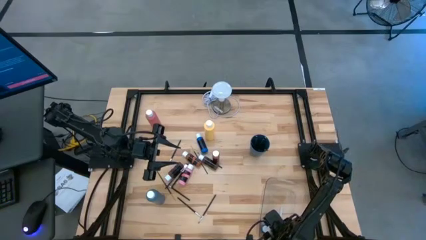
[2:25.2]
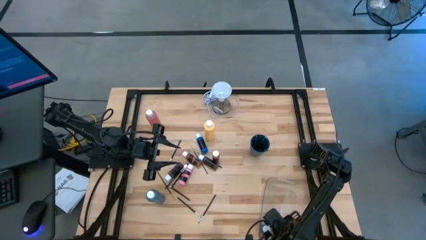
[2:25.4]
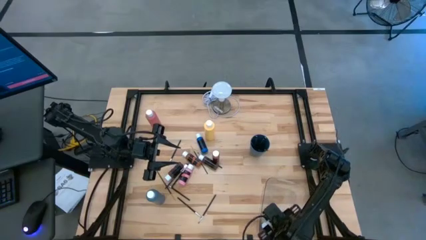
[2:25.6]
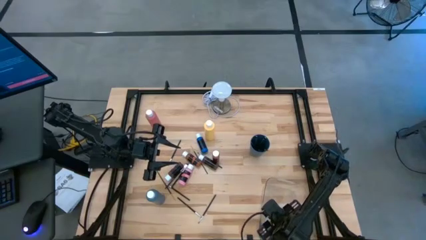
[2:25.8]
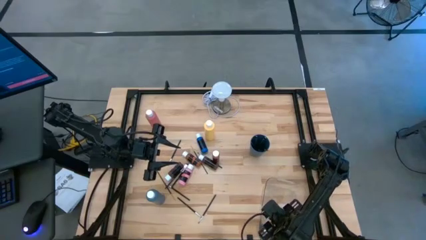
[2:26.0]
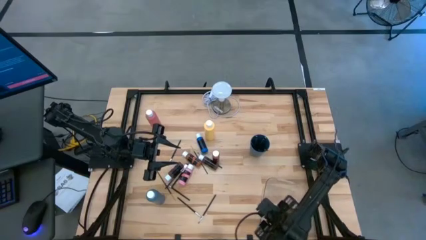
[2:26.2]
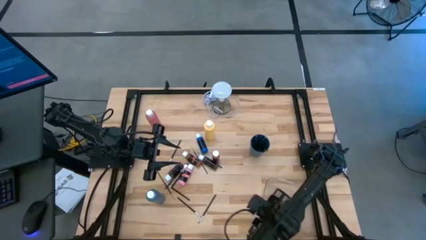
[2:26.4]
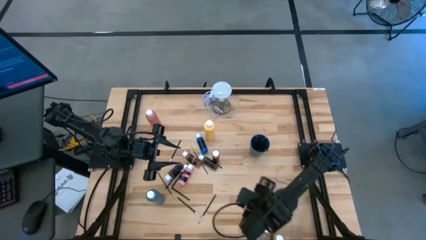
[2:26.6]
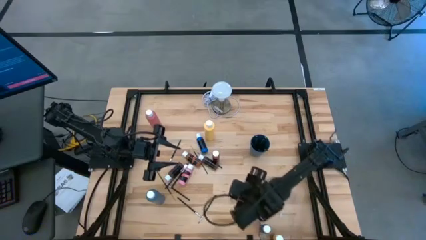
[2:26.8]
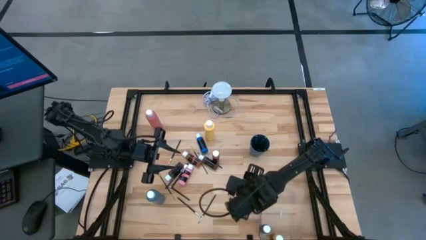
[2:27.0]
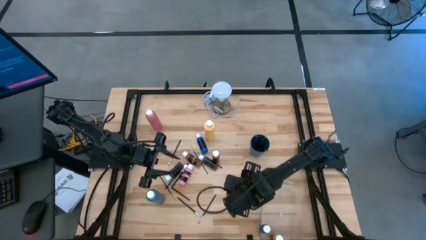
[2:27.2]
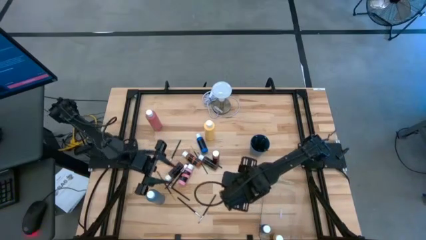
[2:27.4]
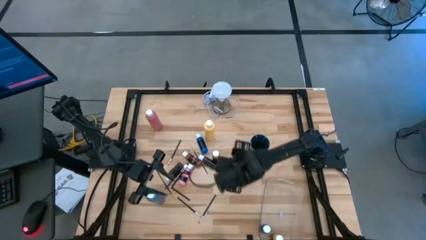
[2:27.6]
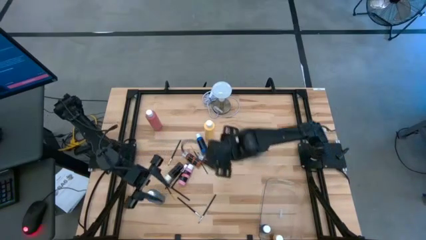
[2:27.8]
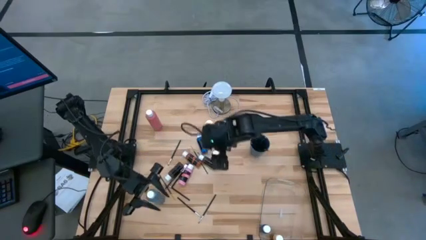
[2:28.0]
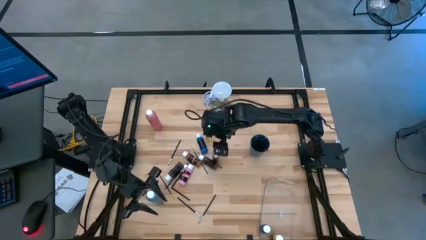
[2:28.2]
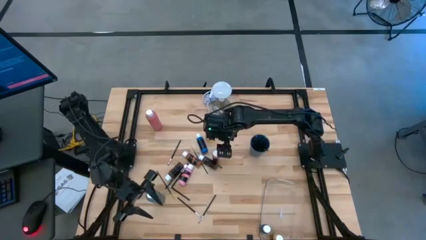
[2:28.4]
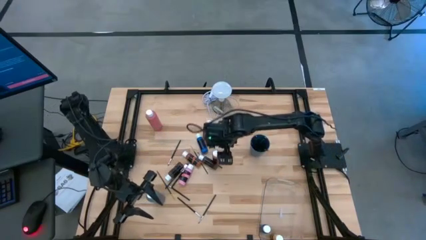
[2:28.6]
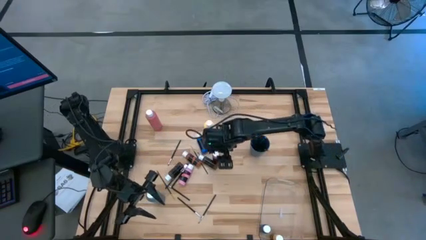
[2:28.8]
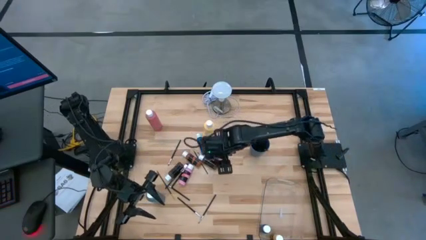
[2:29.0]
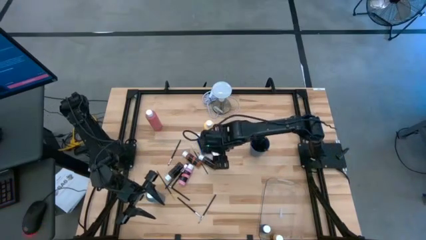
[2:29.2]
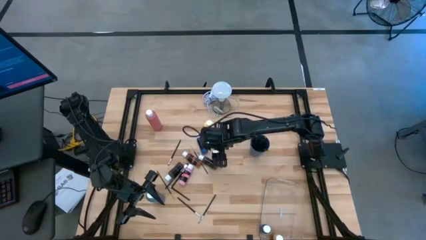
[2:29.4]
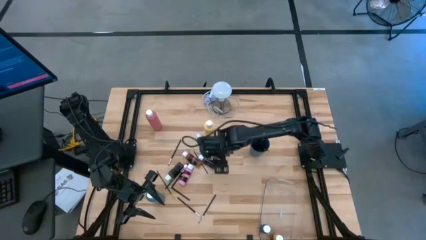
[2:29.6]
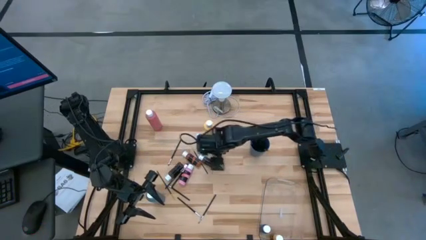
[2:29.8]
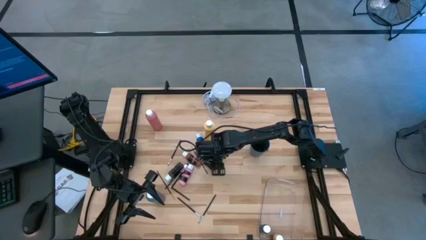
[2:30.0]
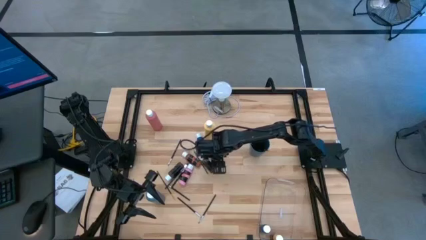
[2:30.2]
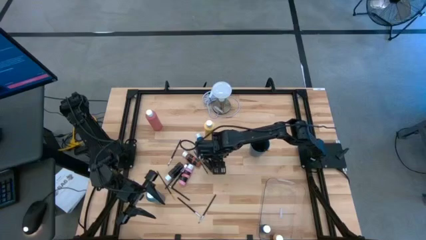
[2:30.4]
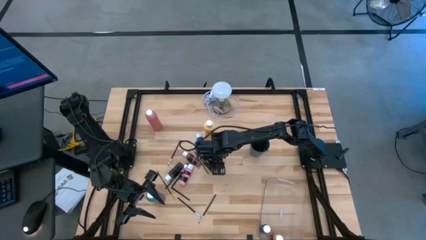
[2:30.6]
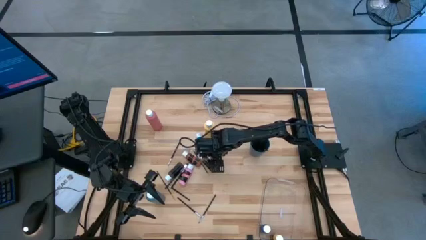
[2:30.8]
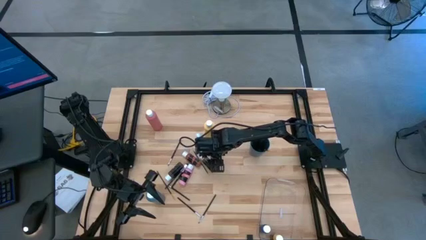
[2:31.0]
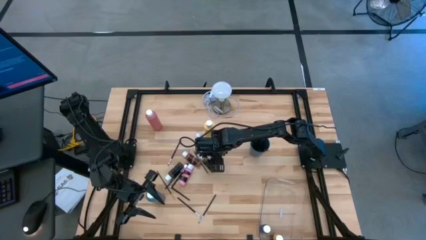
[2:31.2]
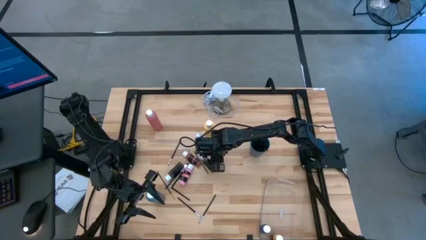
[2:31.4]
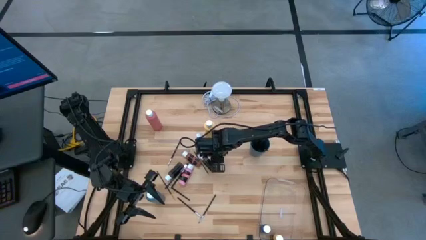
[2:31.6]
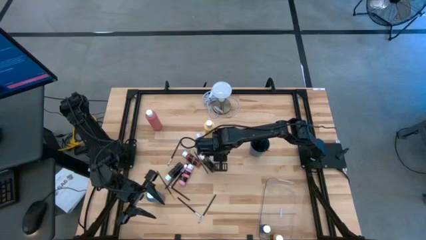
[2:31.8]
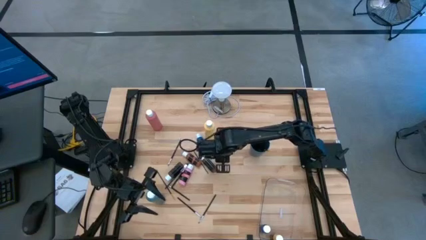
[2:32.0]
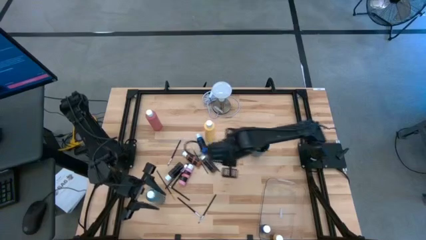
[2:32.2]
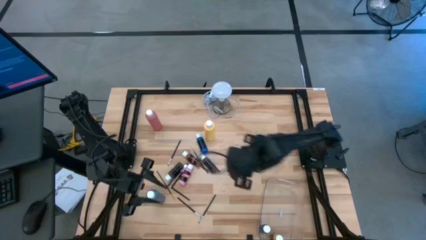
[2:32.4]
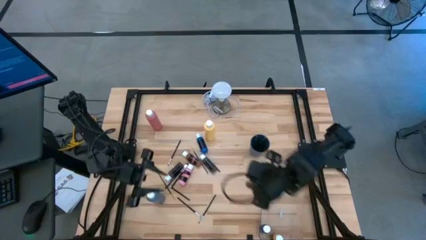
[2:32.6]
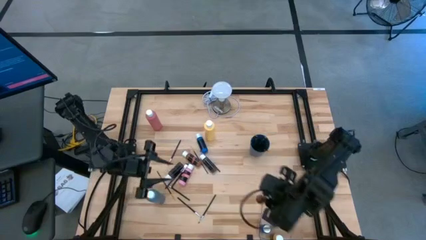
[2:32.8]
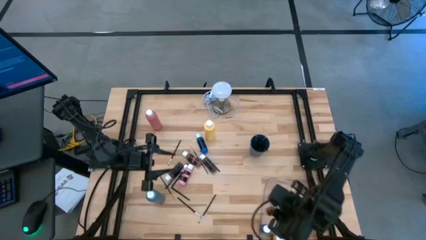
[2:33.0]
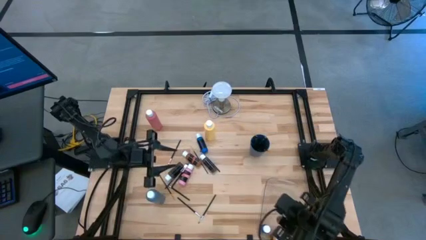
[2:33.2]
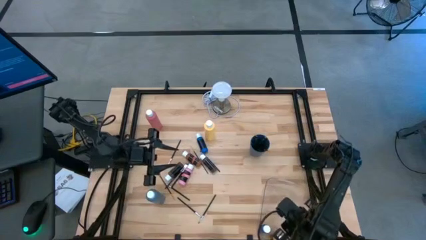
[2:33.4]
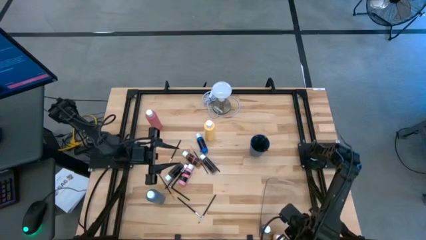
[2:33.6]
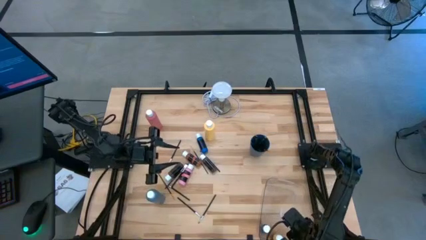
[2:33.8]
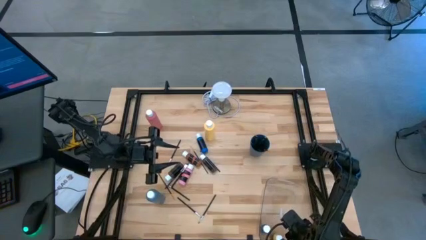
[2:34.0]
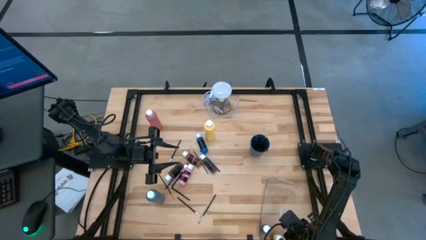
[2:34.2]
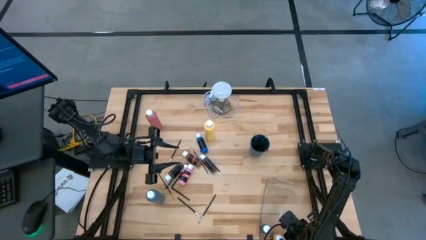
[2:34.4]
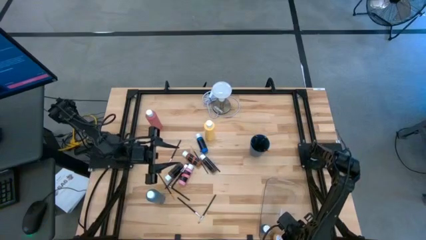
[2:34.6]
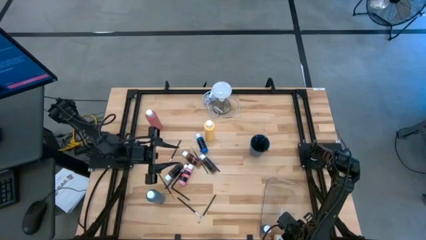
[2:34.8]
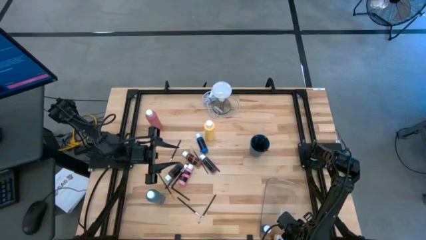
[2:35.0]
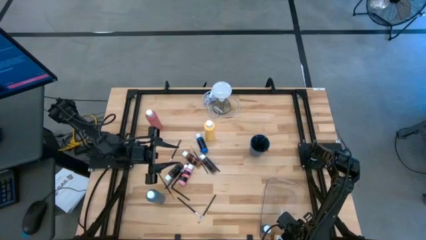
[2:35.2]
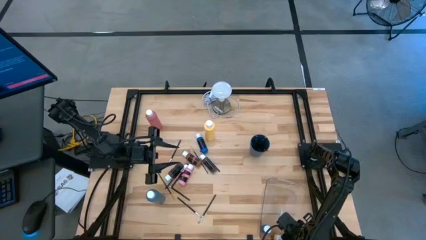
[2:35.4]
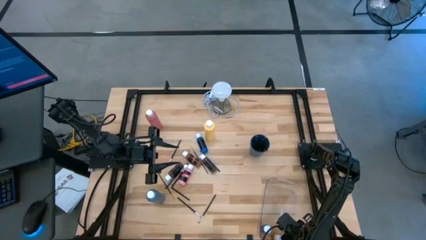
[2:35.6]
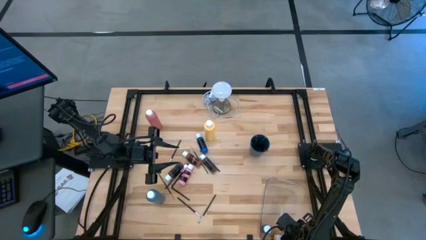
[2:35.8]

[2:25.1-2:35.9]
Task: Pick & Place Paint Supplies
Put the right small brown paint bottle into the transparent bin

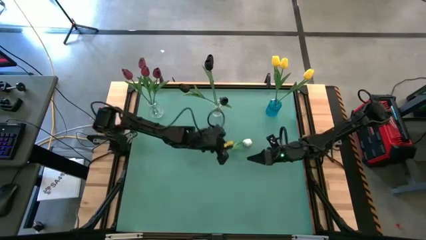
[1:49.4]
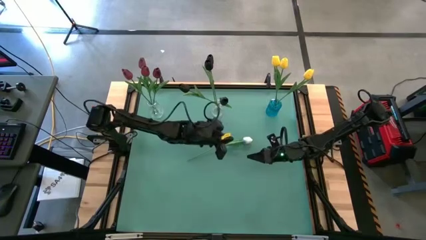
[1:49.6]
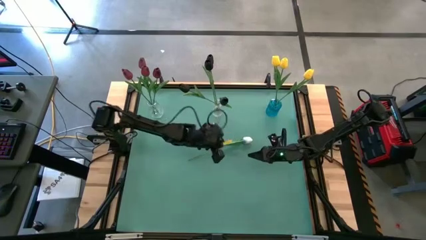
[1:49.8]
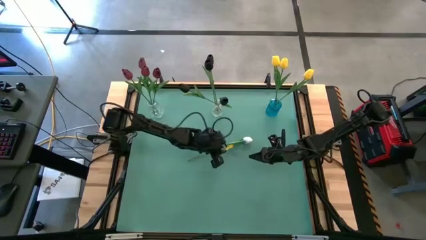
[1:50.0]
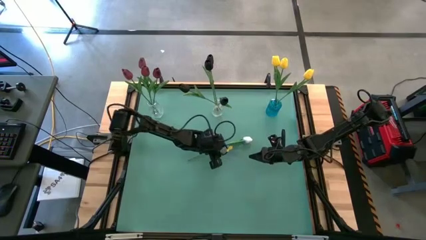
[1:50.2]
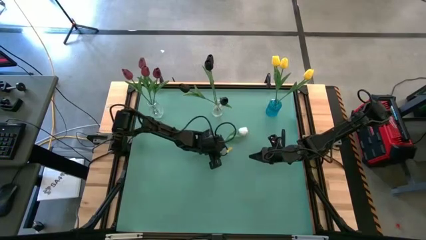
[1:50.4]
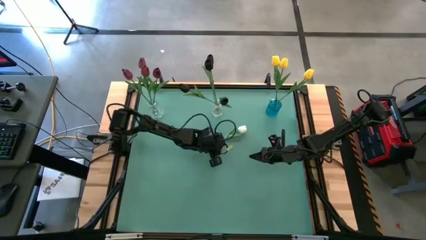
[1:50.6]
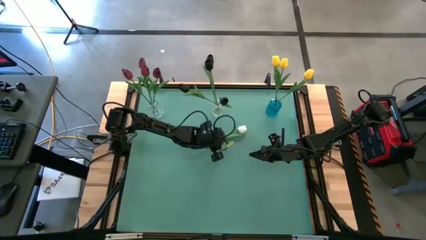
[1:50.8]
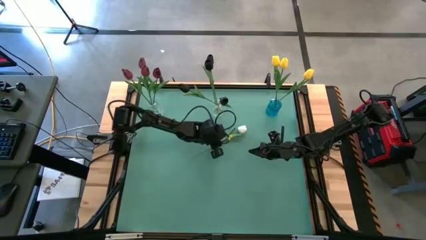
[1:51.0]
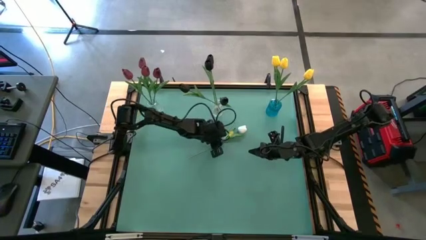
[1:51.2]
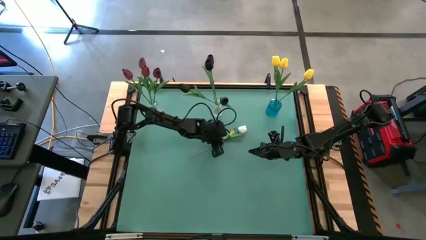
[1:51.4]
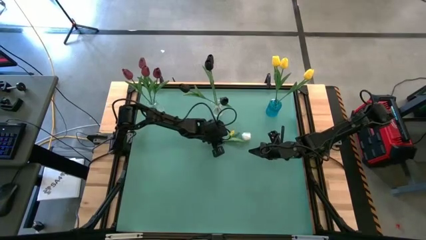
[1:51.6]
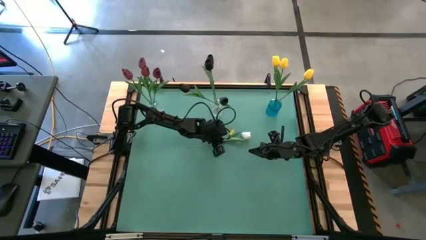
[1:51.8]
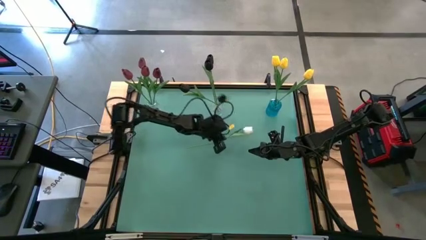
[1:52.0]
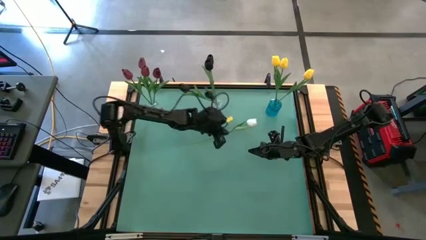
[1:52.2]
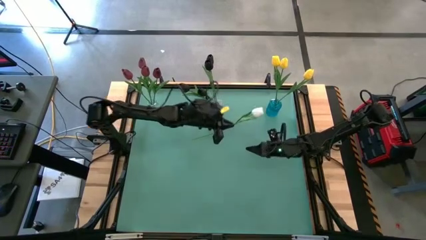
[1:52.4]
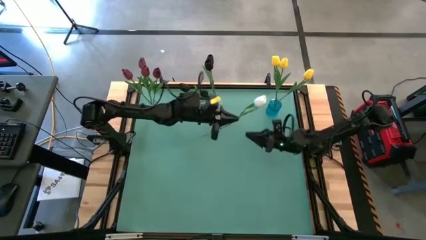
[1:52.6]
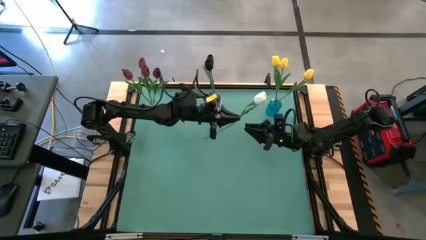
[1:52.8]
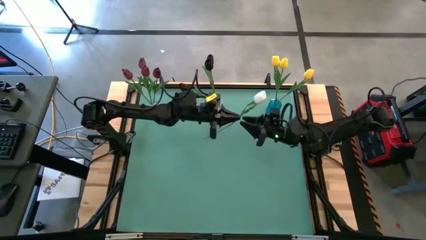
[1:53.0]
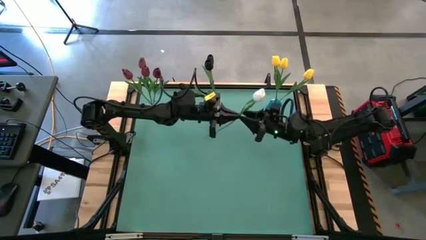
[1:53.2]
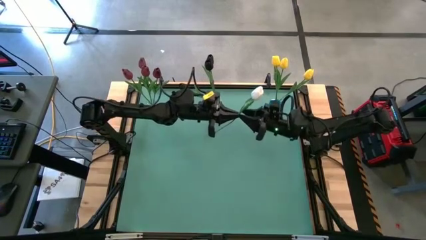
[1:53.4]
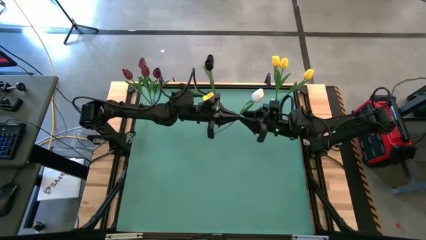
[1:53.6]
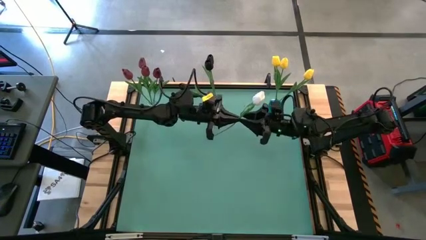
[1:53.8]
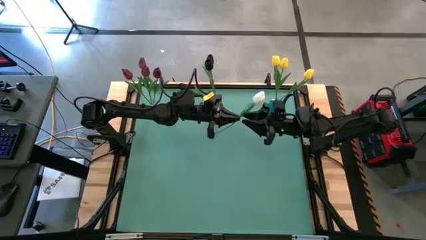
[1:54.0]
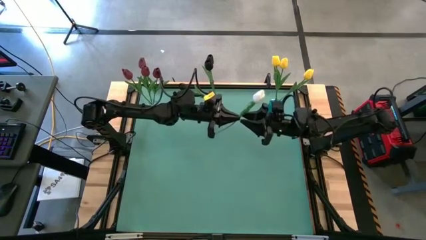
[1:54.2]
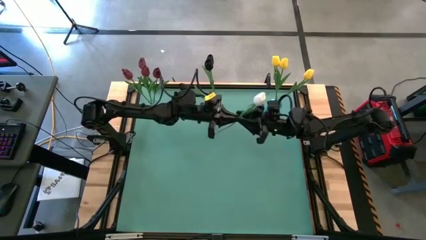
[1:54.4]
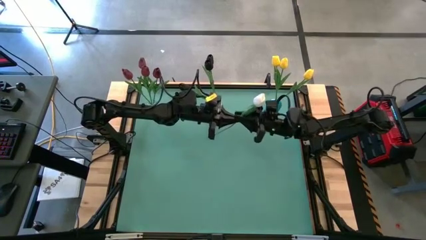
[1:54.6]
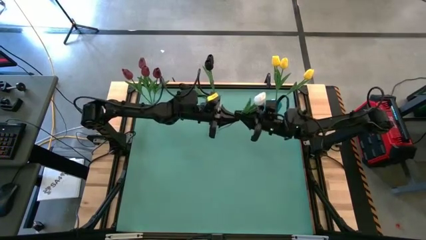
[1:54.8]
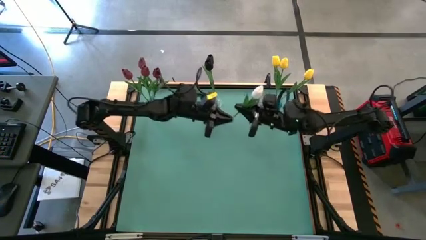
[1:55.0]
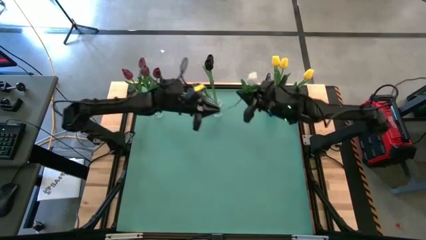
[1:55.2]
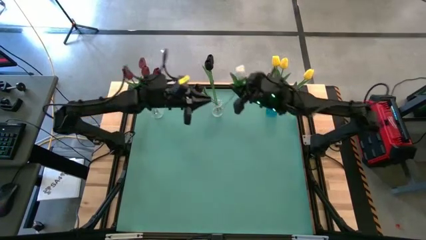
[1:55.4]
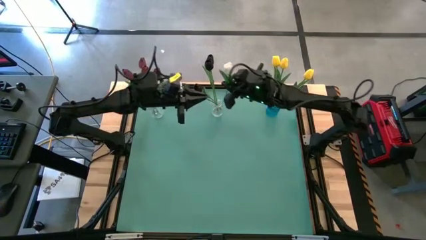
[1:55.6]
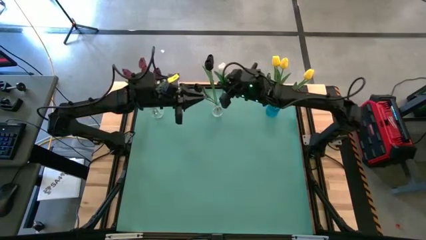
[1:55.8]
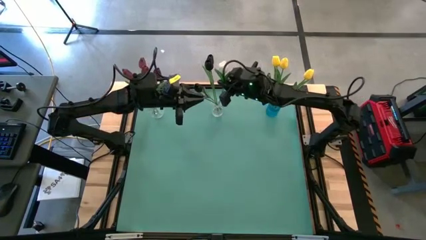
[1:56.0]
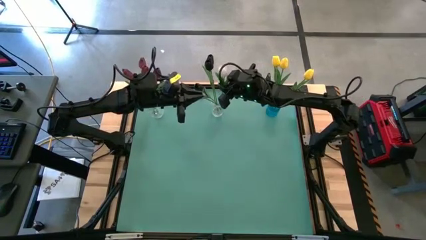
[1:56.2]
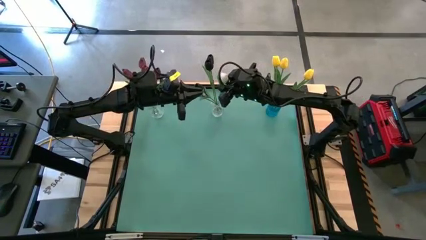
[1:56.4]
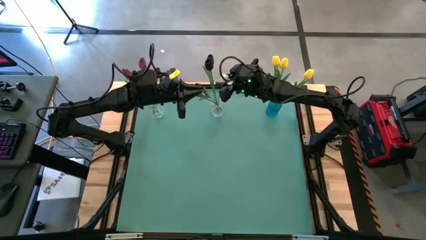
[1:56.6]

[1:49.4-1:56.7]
Task: Sort flowers into vase by color
Put the white tulip into the right transparent vase
